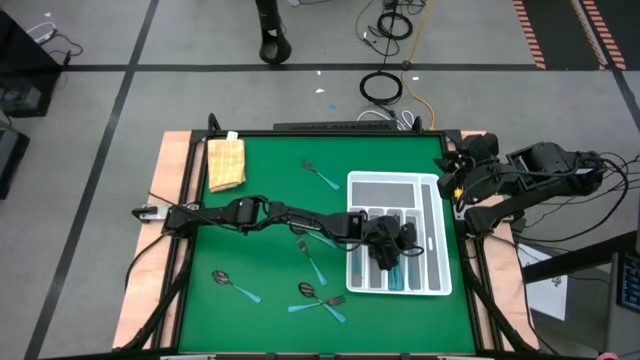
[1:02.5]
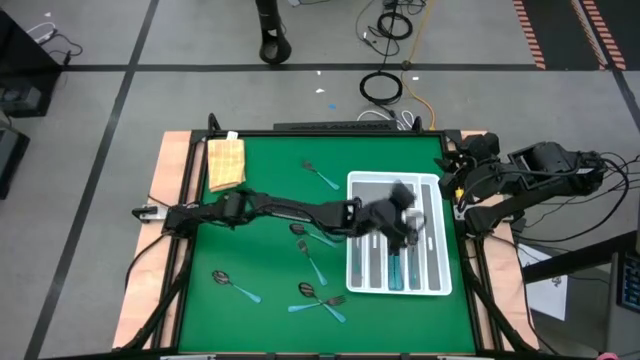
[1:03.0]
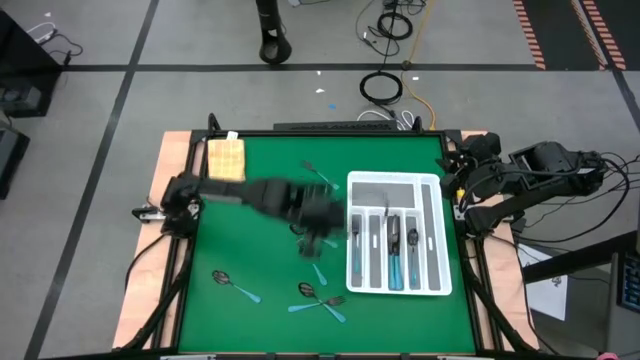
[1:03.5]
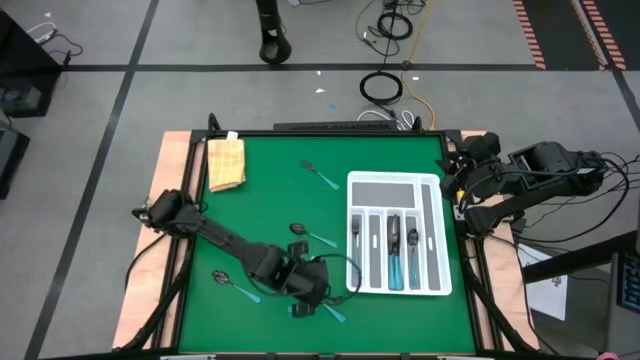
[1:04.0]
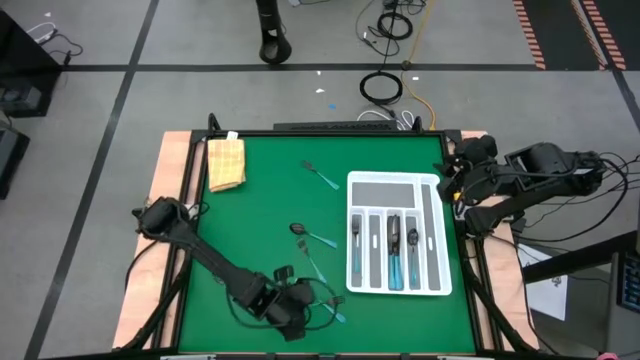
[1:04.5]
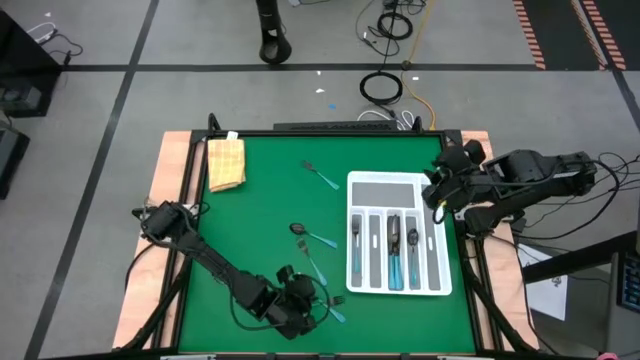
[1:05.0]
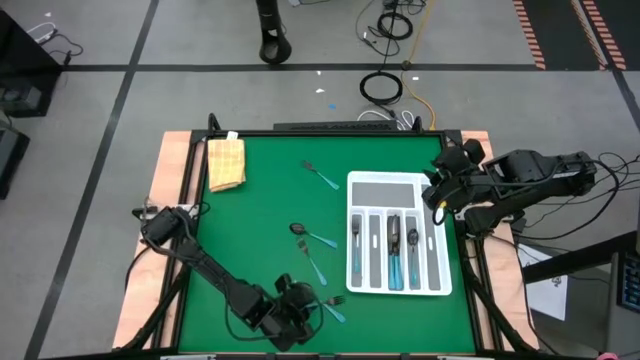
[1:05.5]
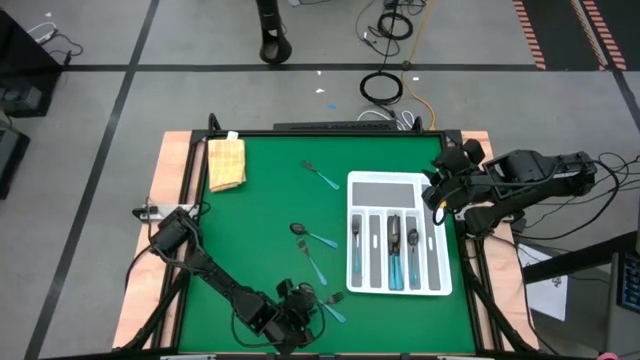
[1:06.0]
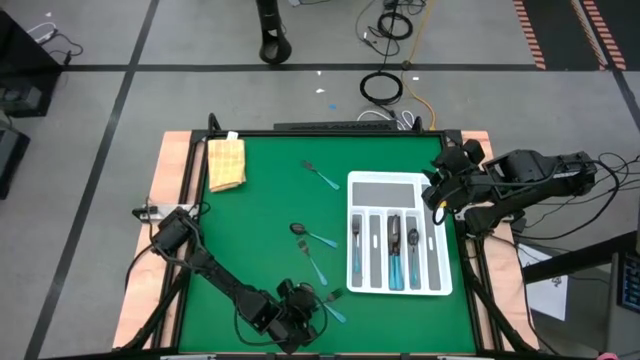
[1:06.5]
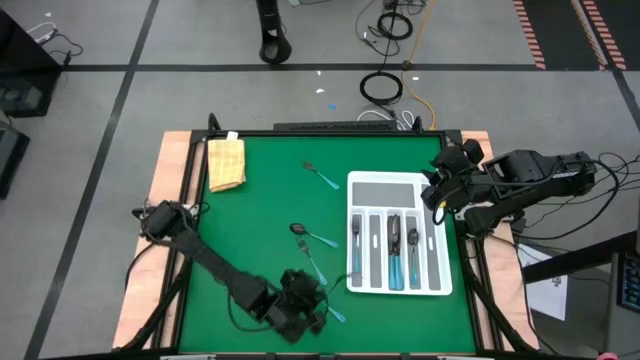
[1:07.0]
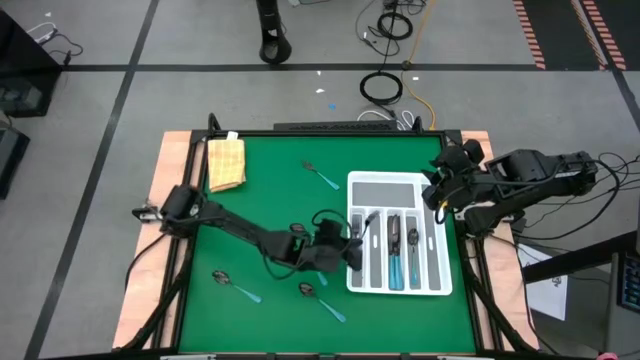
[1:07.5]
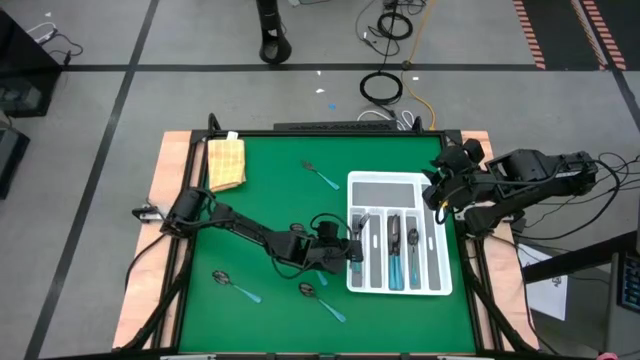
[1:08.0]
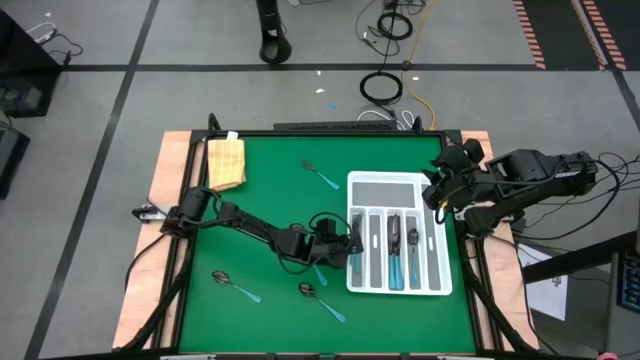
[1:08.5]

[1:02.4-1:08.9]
Task: Sort silverware
Put the bottom blue fork into the tray

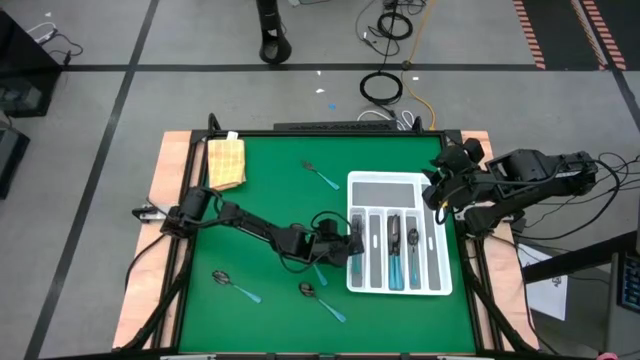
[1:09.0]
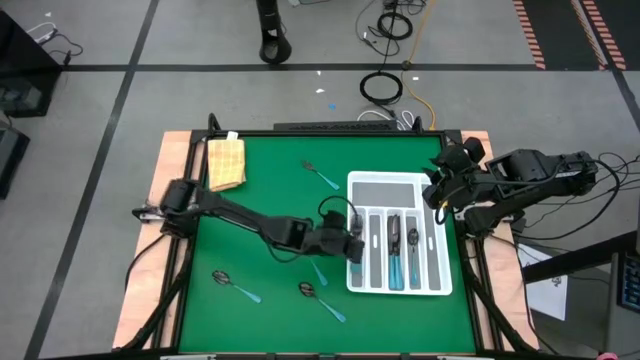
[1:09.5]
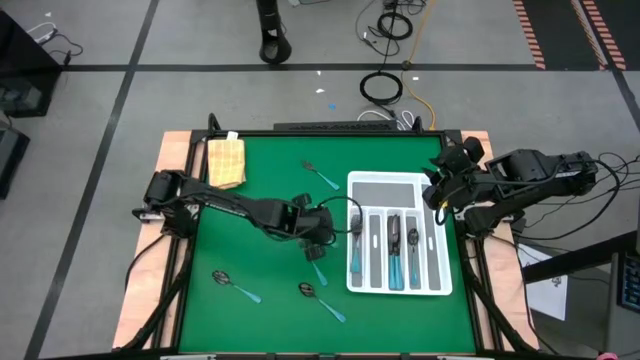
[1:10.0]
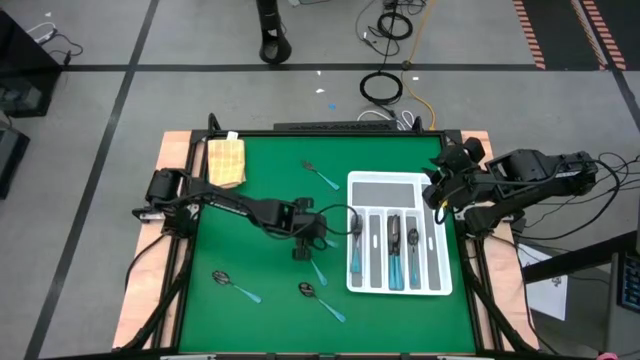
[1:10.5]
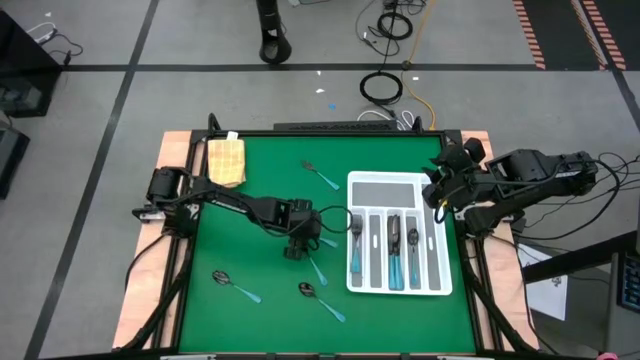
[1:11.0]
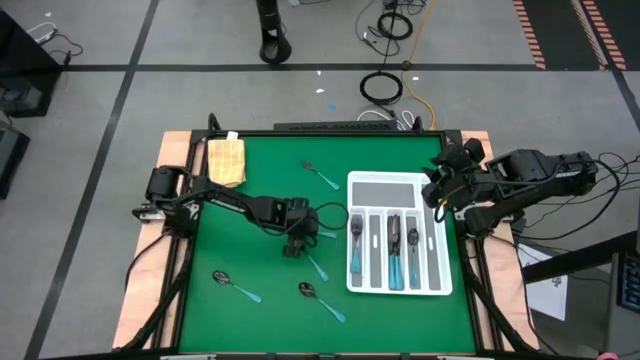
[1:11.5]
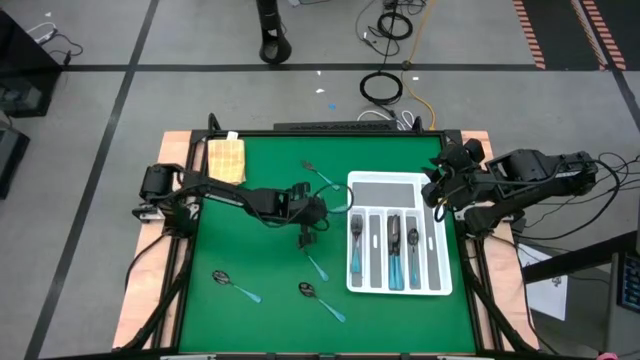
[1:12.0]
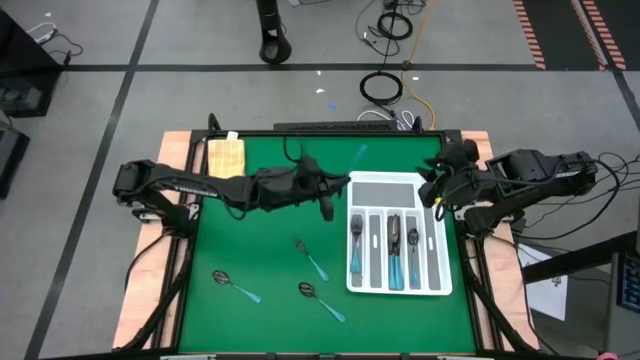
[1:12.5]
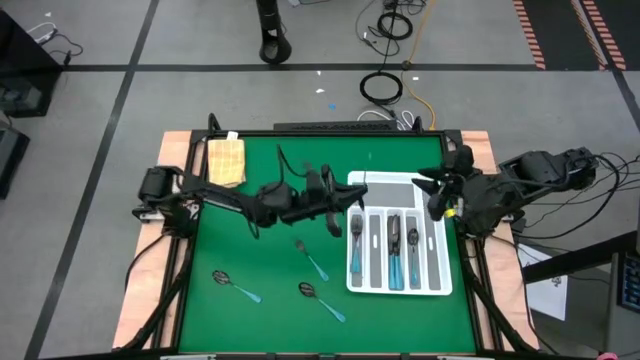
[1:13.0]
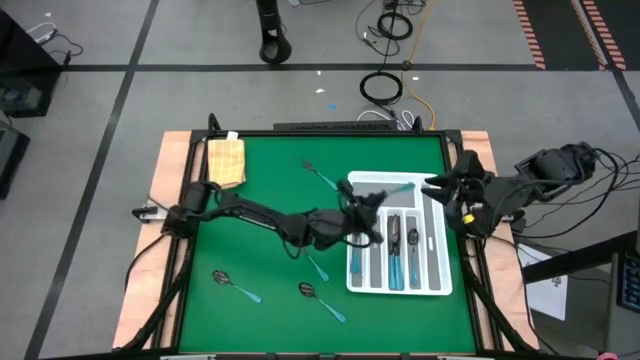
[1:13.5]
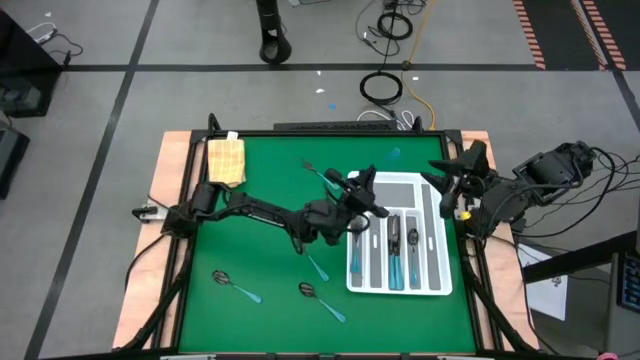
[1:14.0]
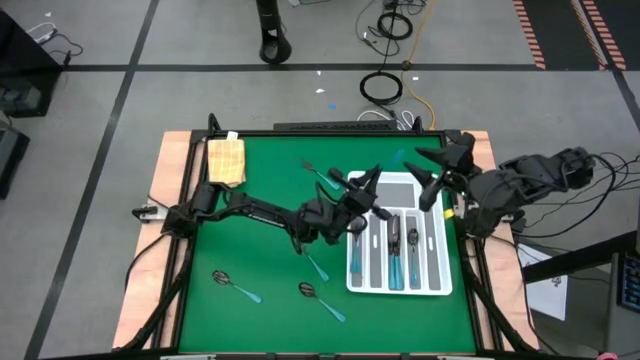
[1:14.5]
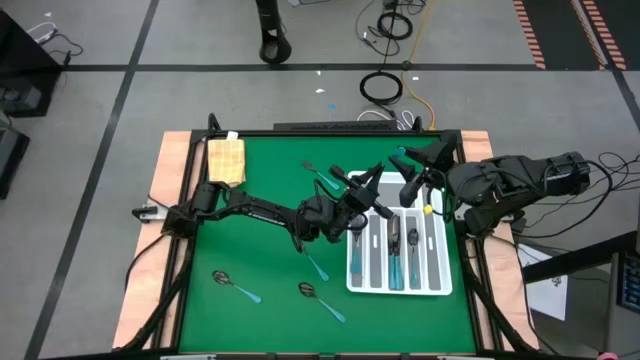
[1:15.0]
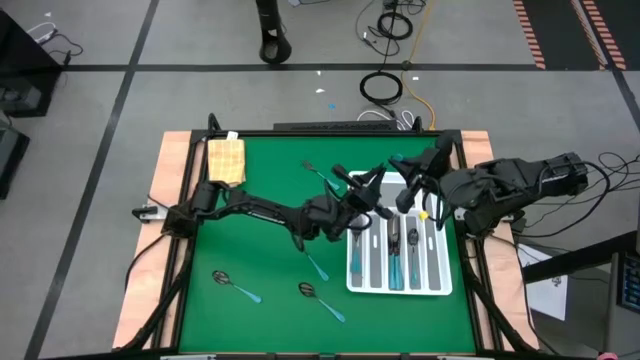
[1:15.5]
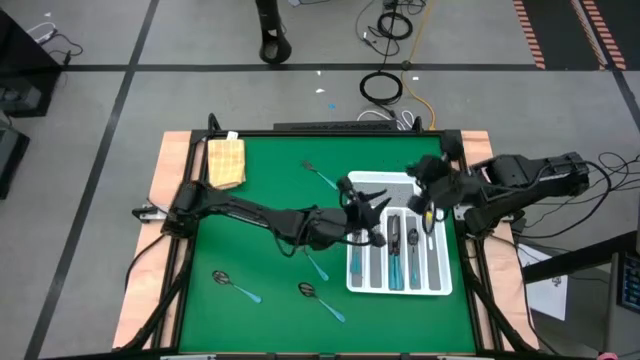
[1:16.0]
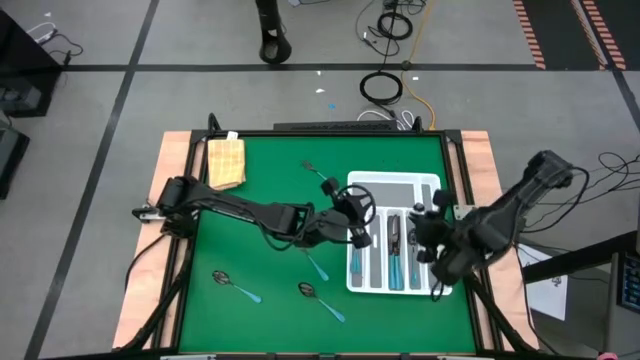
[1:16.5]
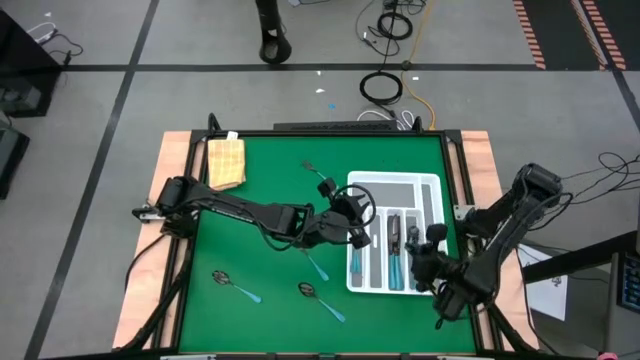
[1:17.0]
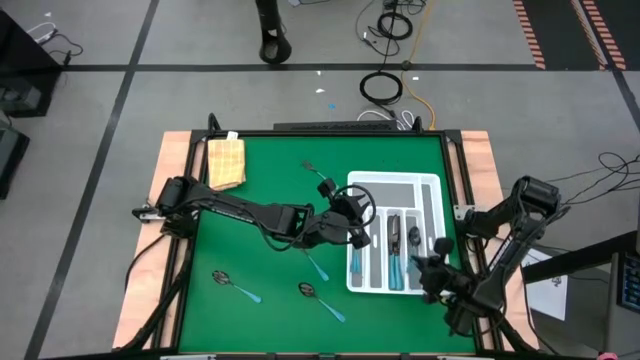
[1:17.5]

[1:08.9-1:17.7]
Put the top right blue spoon into the tray

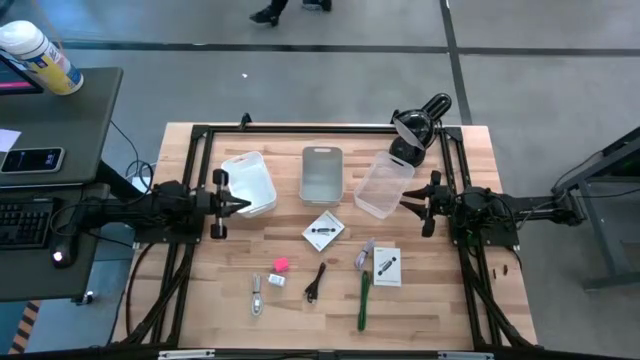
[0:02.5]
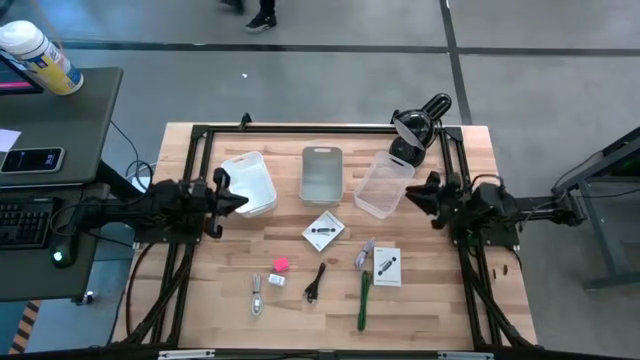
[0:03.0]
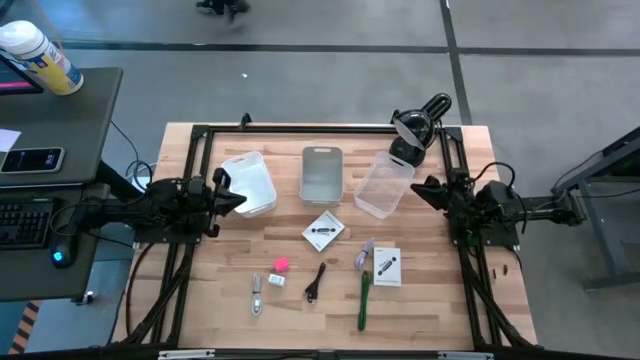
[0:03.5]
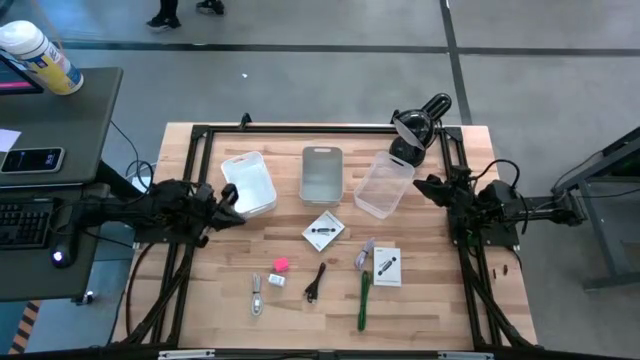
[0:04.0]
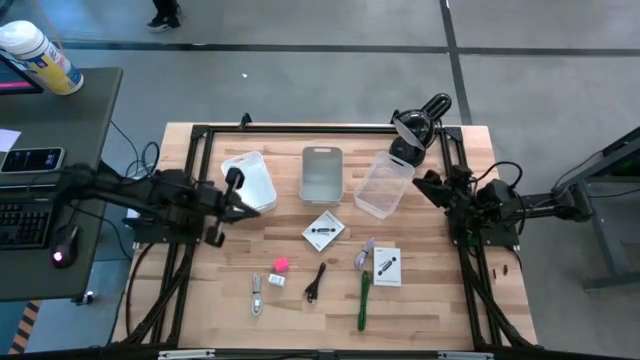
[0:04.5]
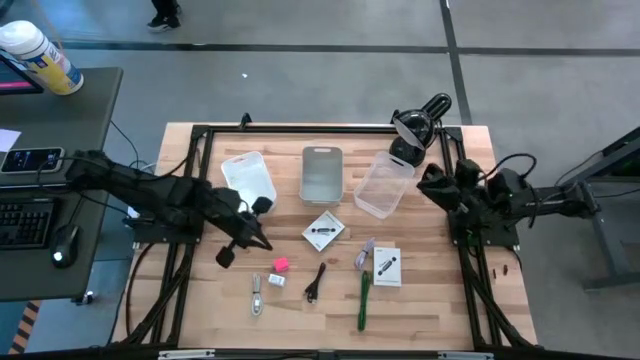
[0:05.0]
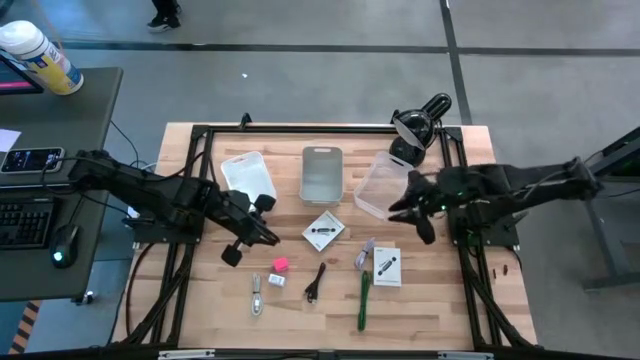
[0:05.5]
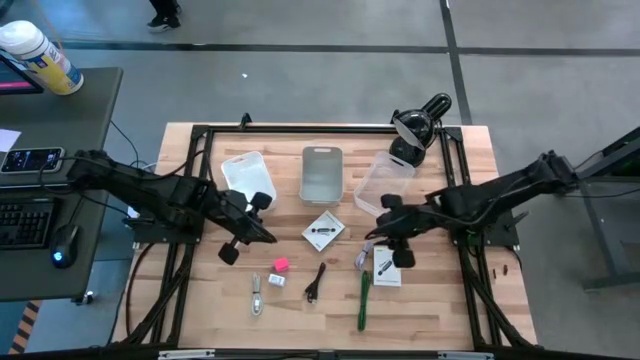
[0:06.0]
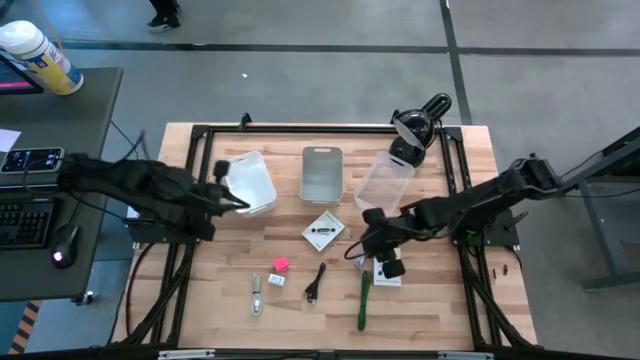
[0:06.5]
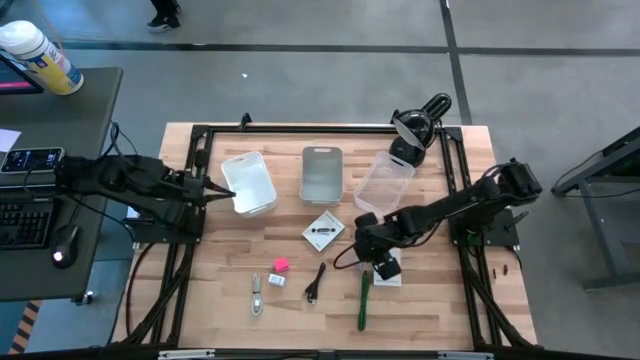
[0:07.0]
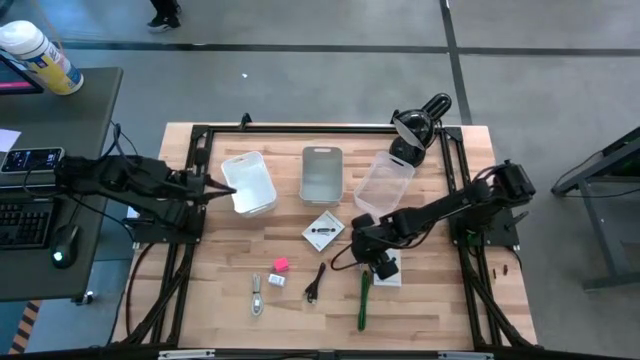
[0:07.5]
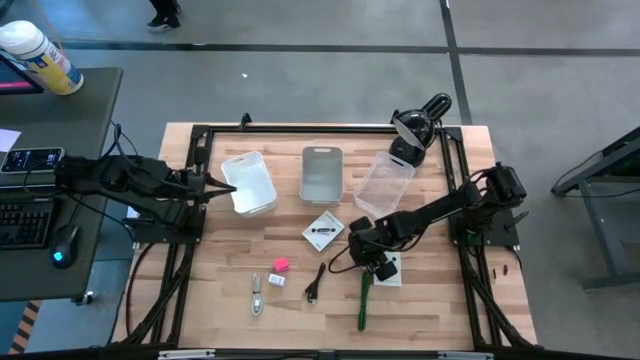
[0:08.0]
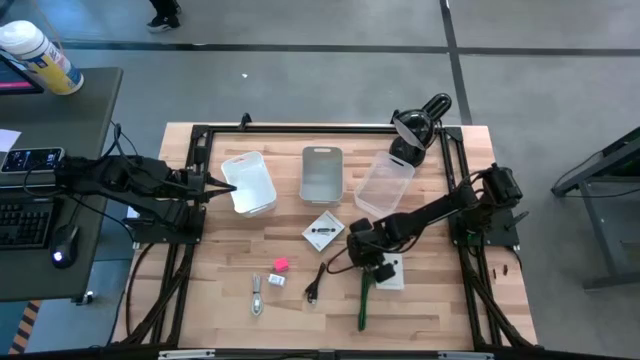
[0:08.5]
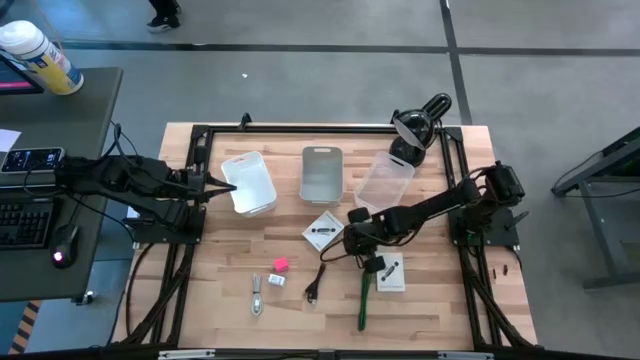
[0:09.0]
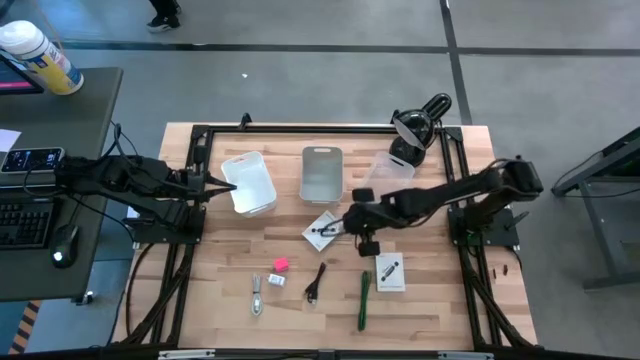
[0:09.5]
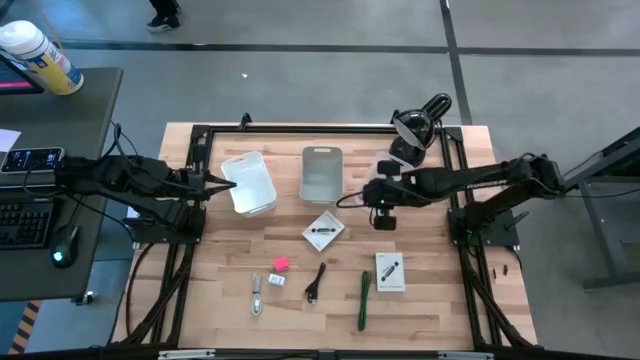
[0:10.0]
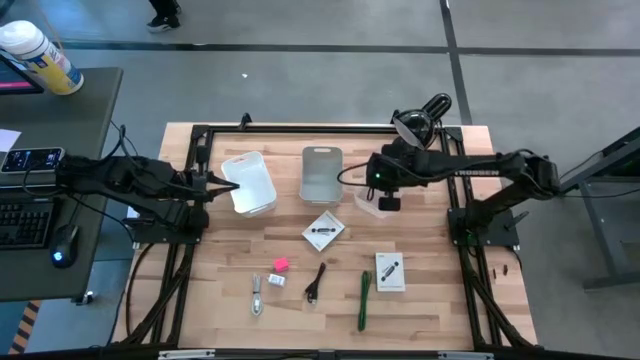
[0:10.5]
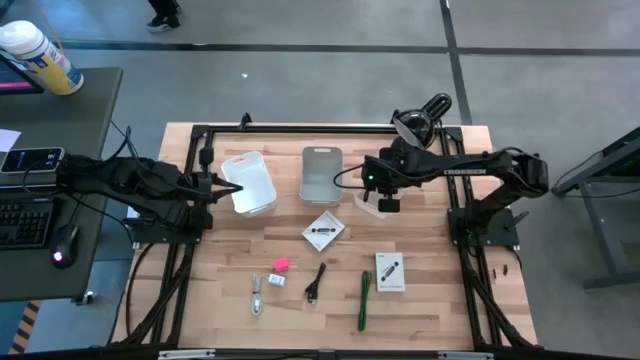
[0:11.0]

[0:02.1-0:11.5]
Task: Pick and place items into bin
Put the top white charger cable into the transparent bin
